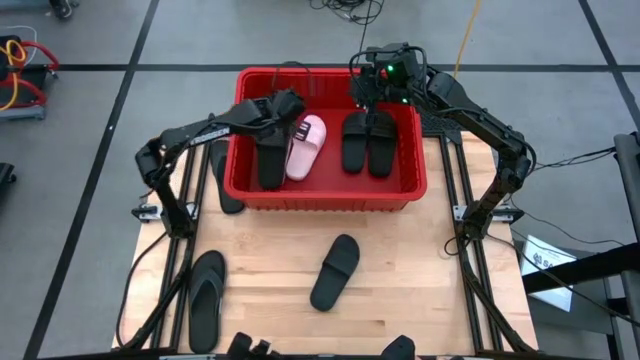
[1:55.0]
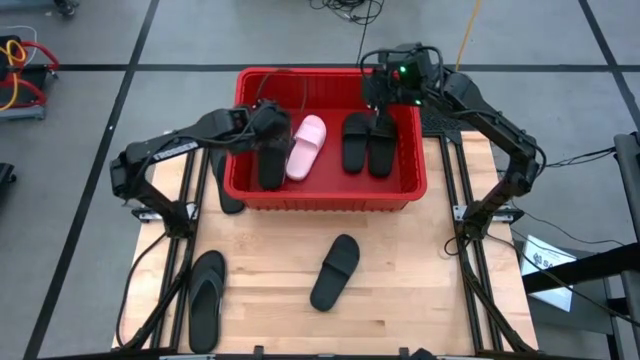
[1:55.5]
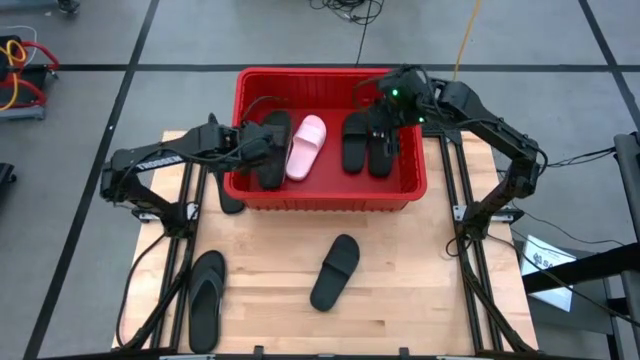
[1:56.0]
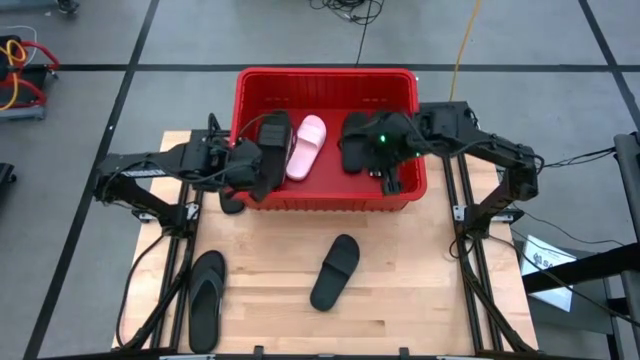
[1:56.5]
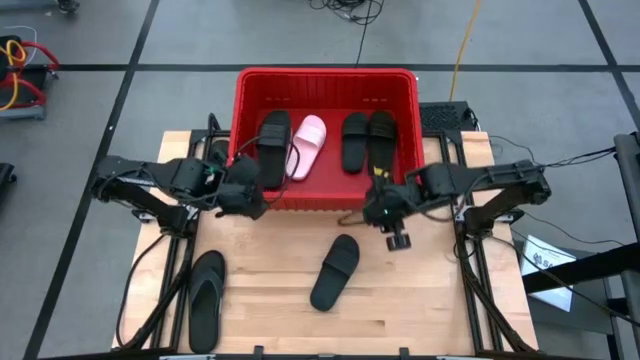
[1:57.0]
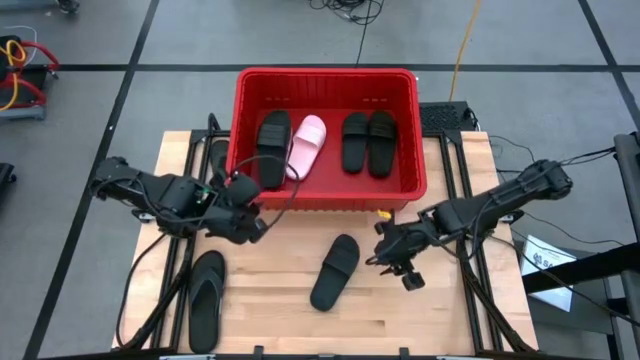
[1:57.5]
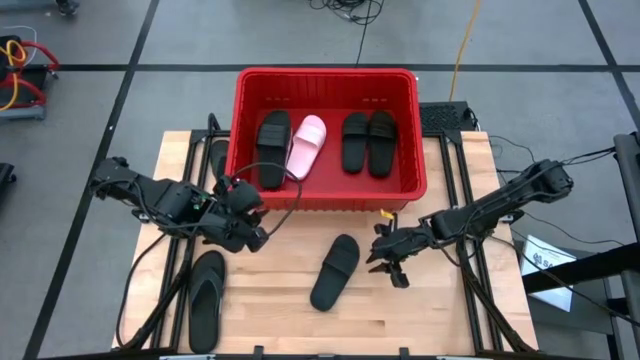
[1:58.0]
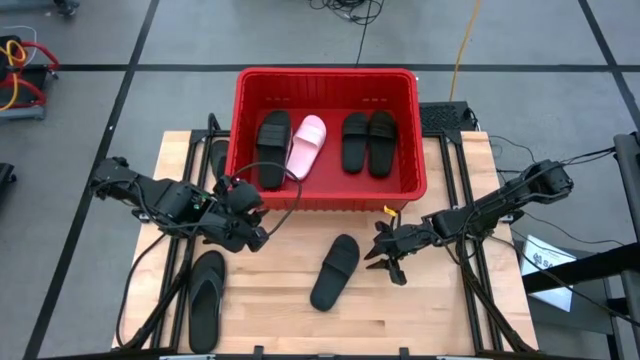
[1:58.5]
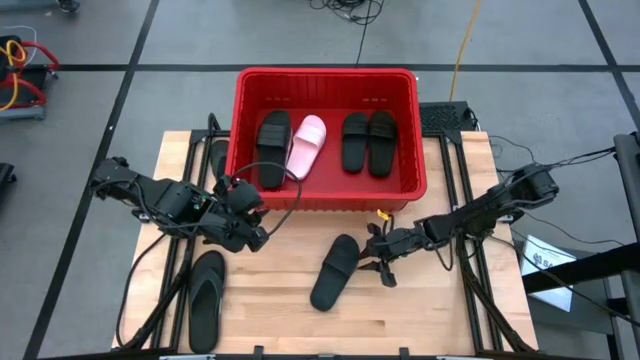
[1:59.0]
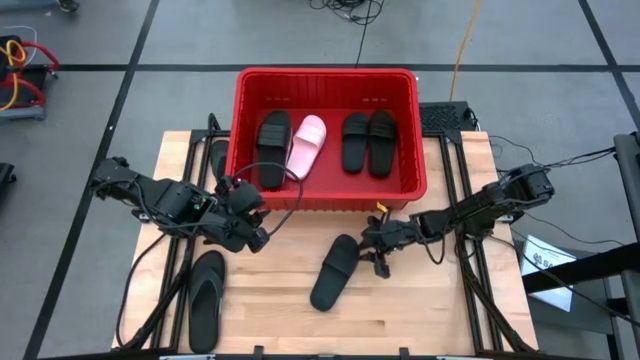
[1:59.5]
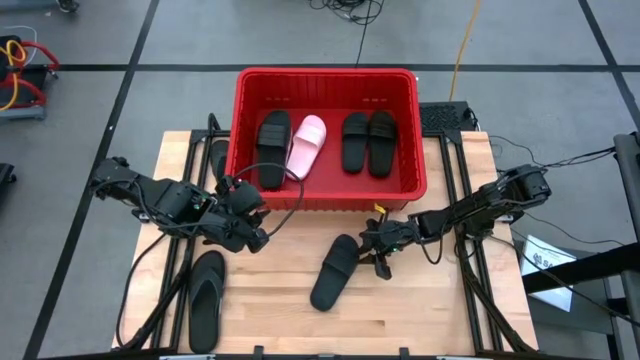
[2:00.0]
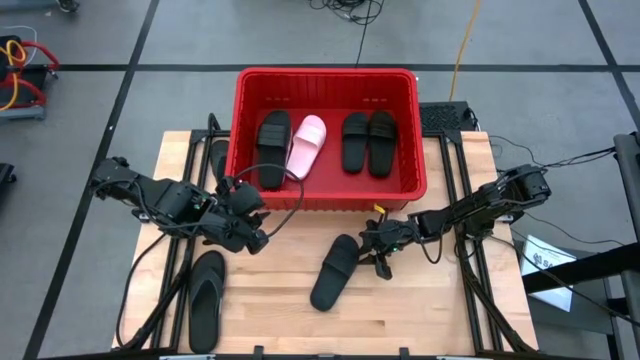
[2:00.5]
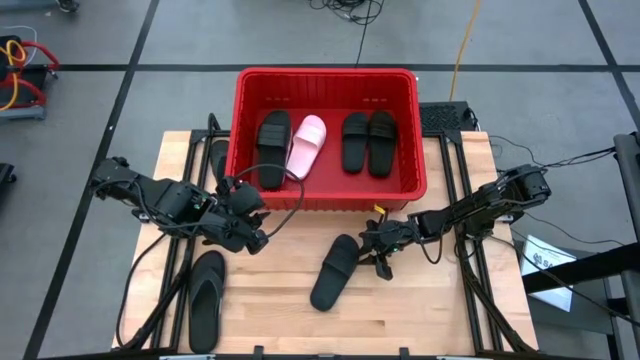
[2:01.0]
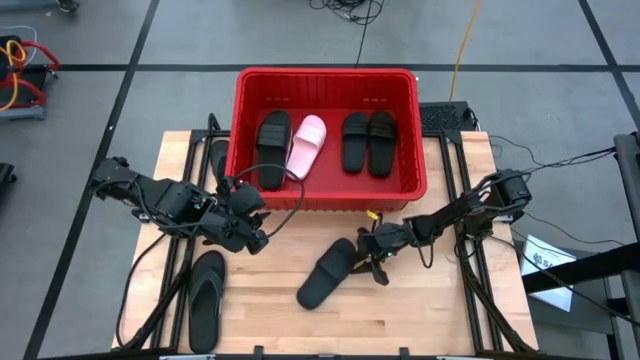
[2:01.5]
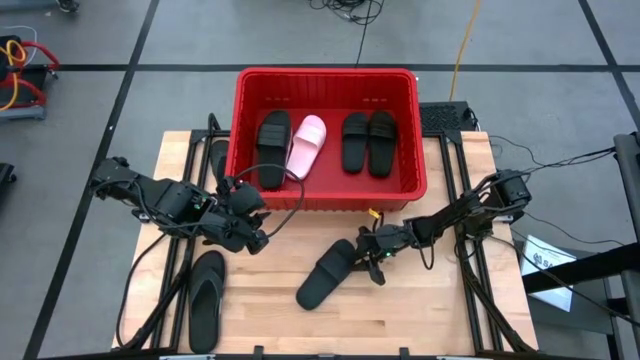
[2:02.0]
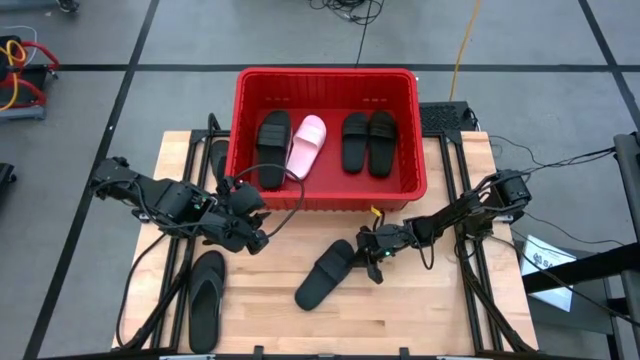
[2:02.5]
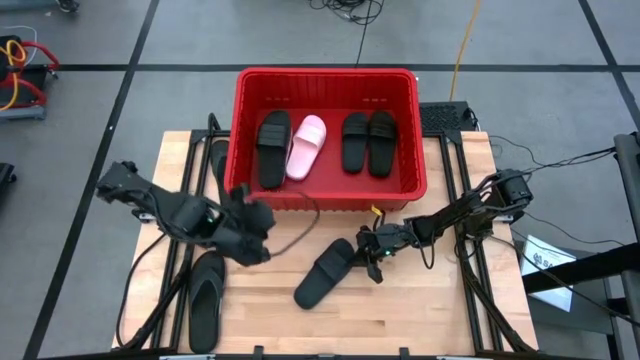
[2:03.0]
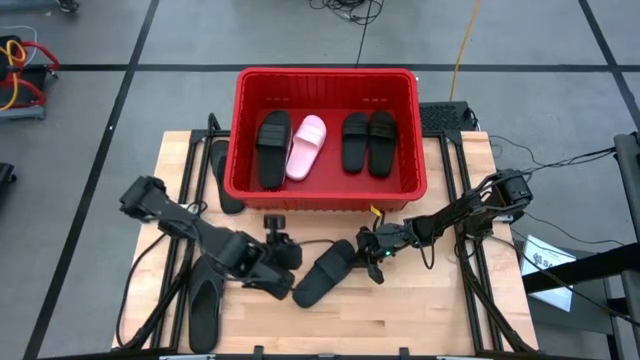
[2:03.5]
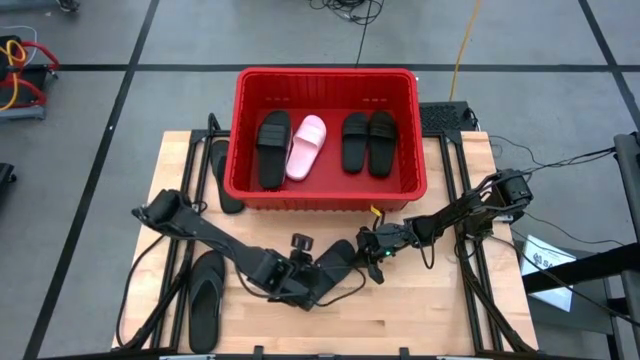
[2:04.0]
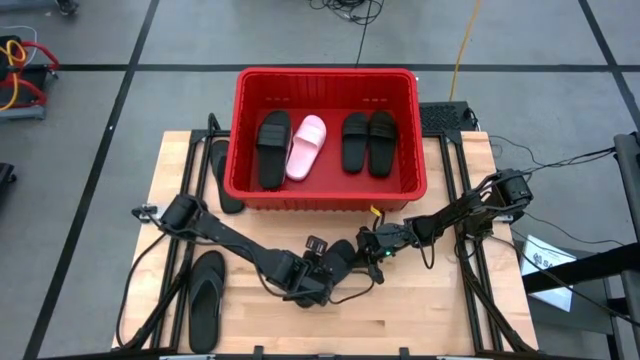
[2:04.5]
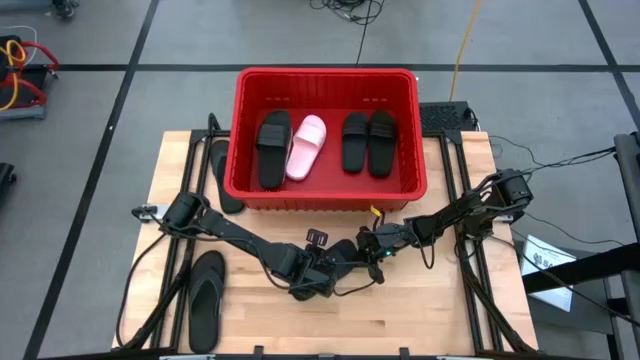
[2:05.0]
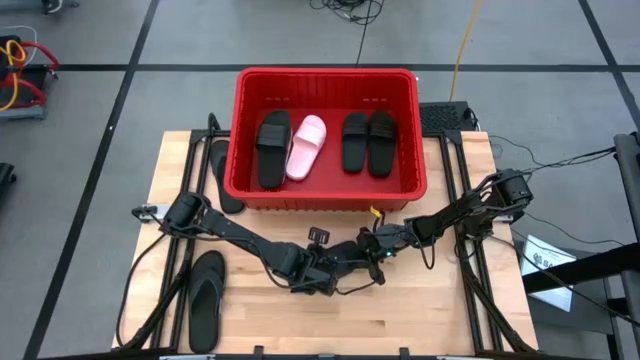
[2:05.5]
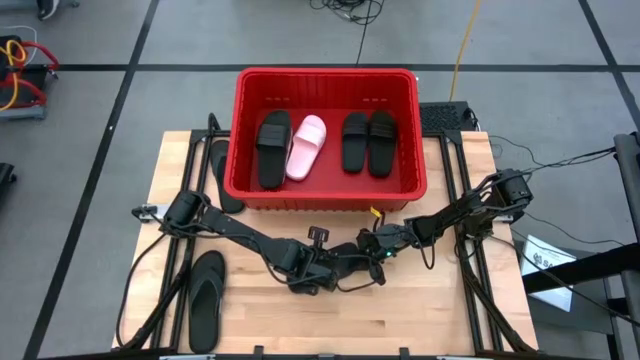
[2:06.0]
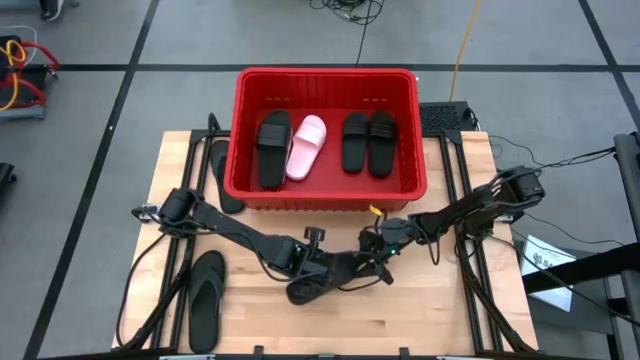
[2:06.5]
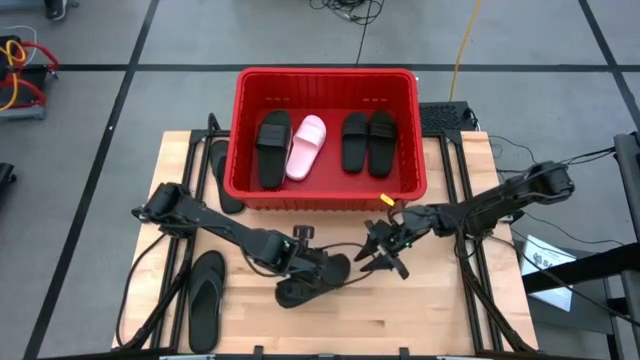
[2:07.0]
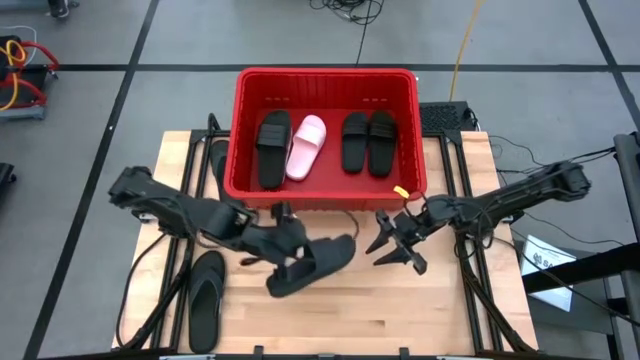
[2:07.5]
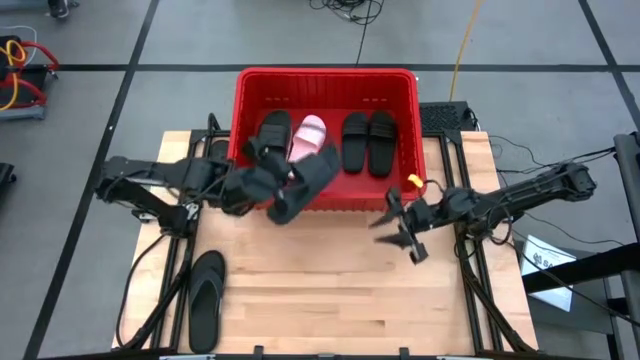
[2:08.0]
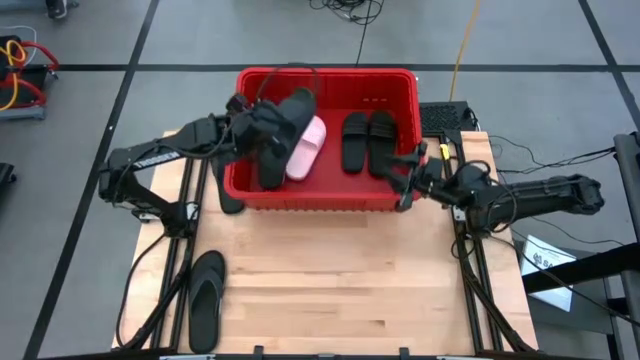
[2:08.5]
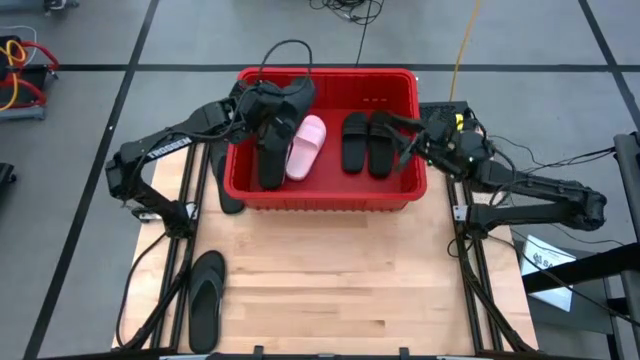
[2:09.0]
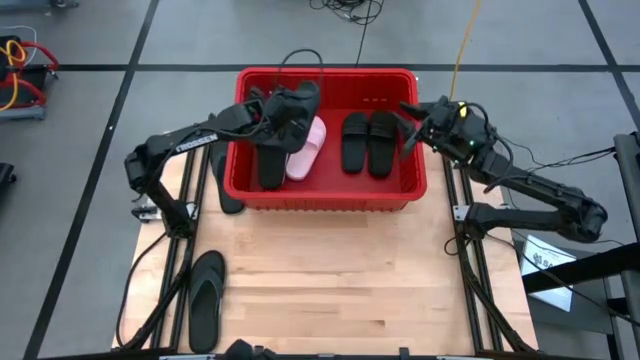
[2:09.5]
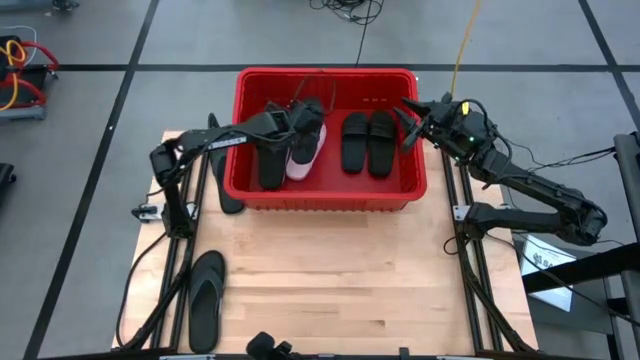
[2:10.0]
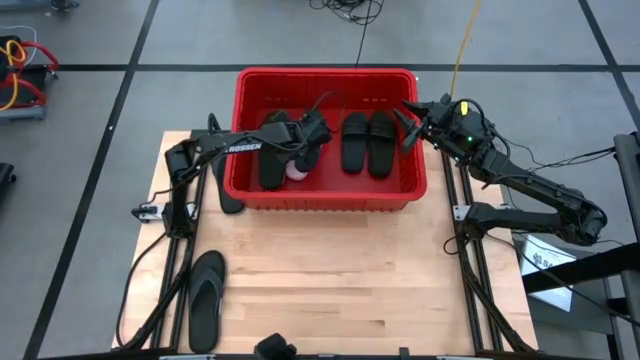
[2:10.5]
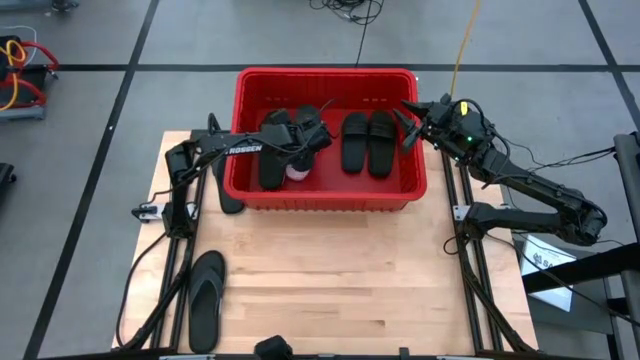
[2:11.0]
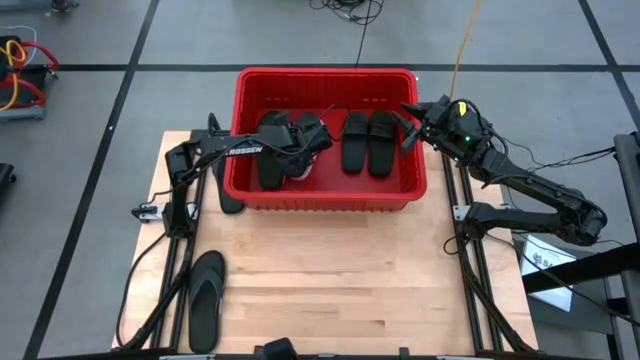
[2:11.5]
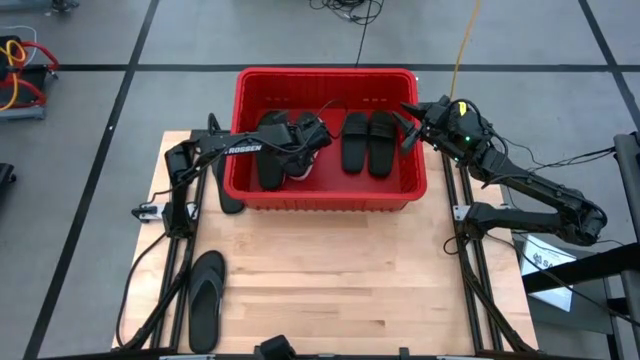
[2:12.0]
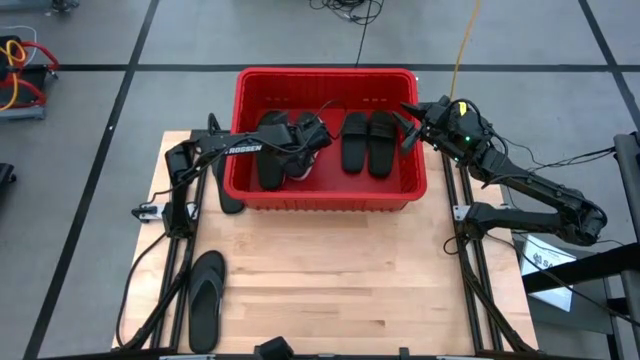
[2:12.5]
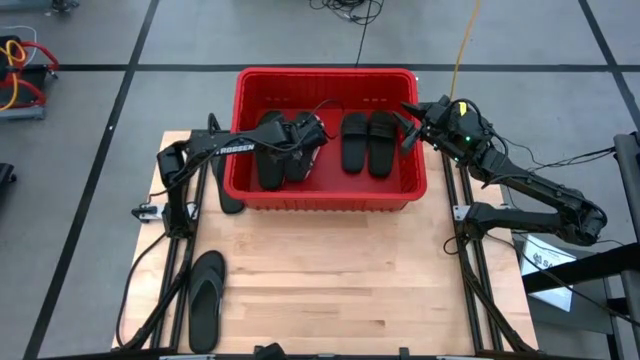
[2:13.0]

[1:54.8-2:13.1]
Task: Pick and place slides into bin
Put the black slide on top of the pink slide in the red bin

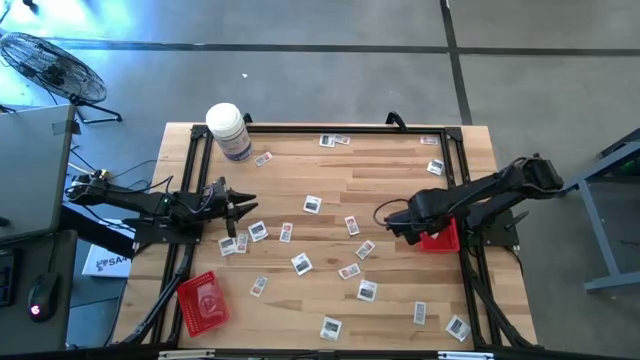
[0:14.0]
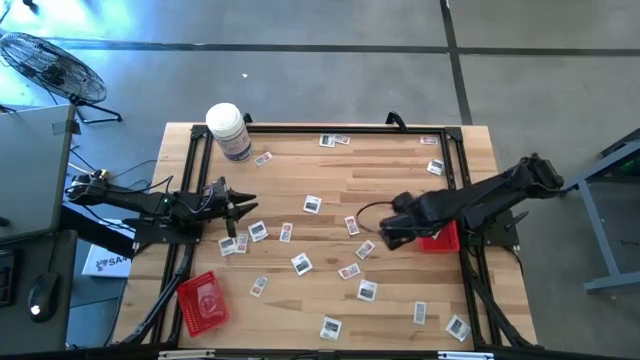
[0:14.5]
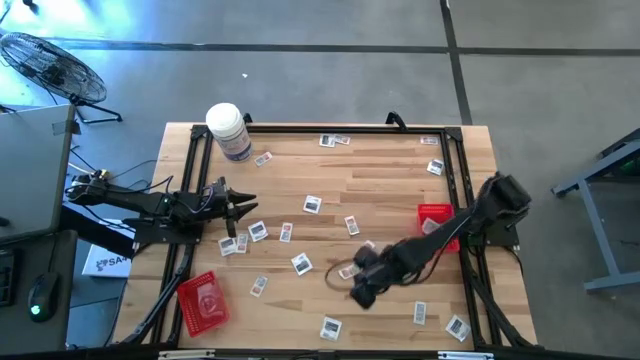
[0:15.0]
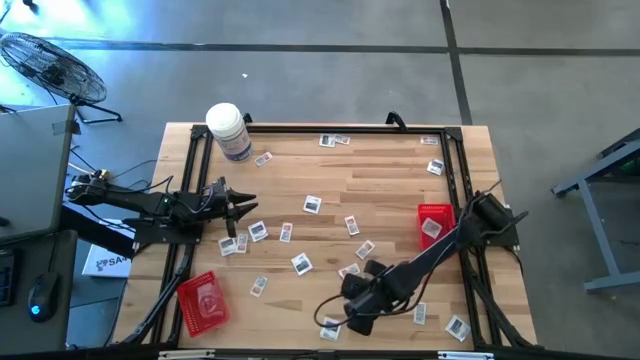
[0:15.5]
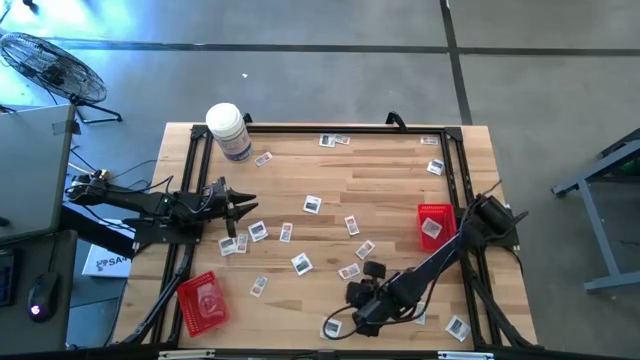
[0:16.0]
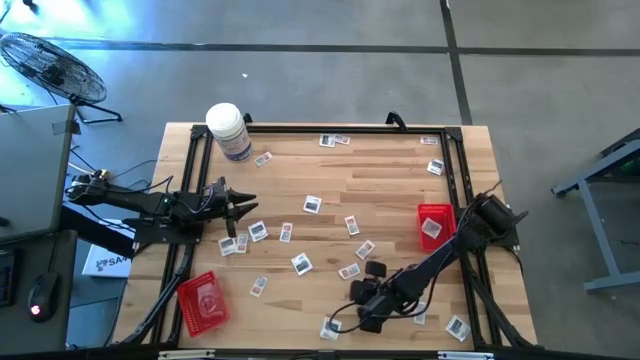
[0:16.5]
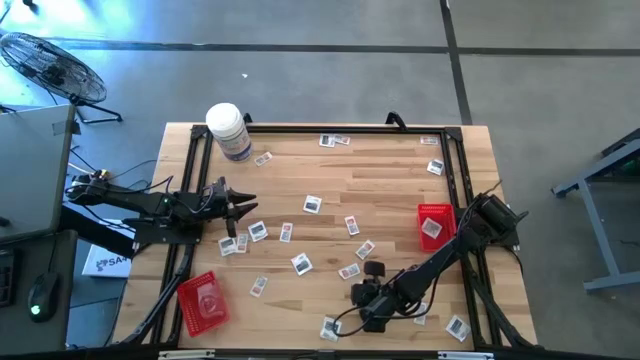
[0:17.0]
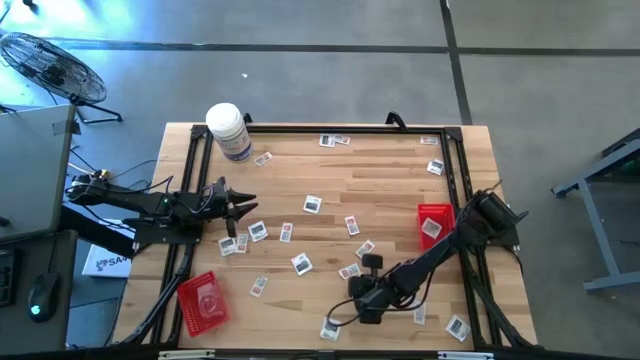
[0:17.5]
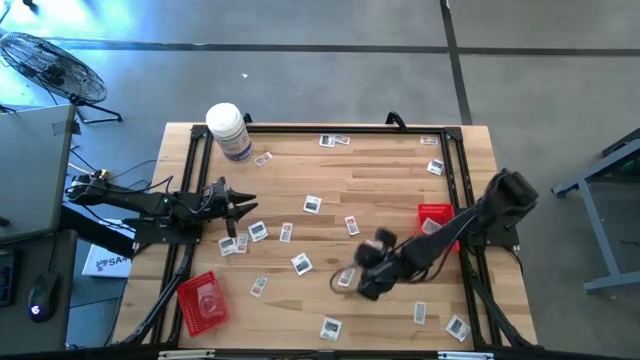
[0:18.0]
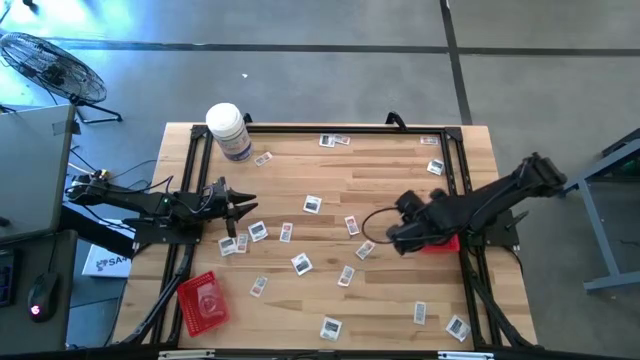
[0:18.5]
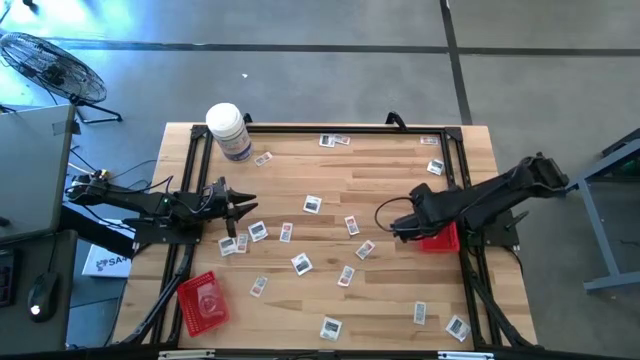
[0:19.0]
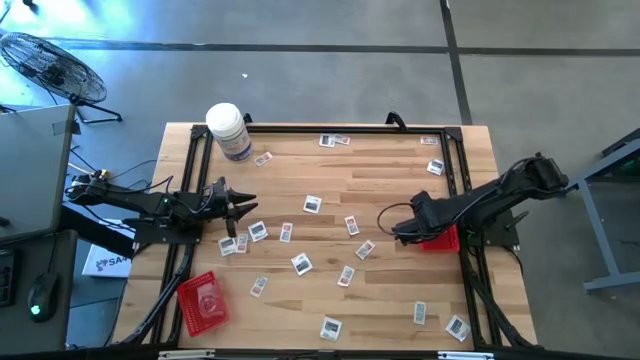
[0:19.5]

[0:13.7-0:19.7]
Task: Pick & Place First Aid Supplies
Put the towelette pack into the right red bin
